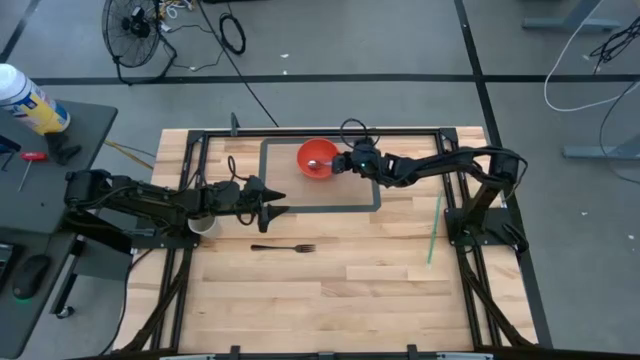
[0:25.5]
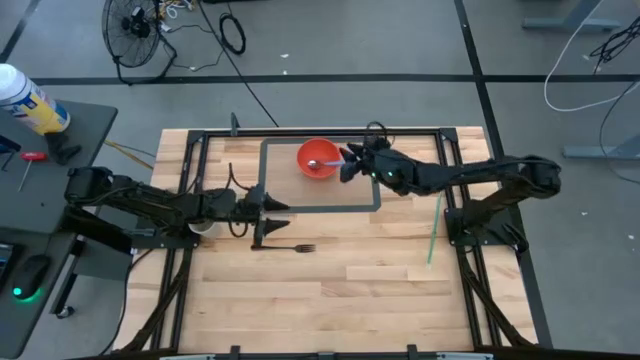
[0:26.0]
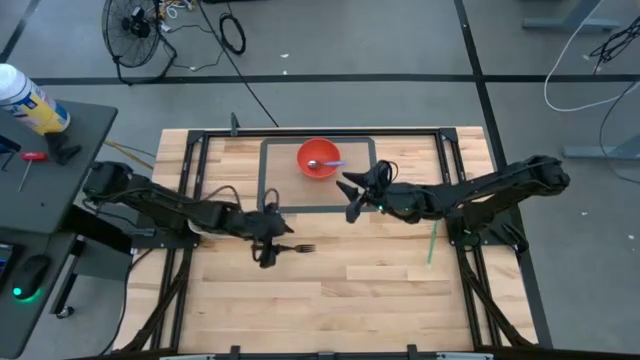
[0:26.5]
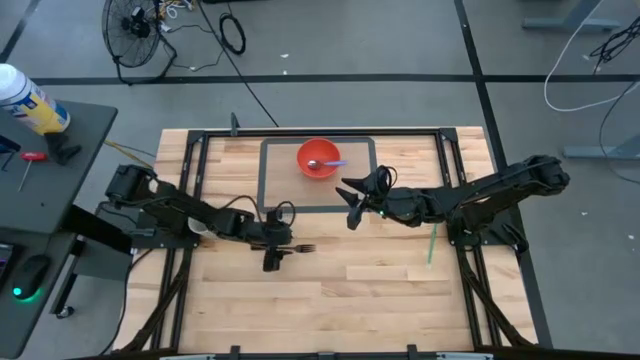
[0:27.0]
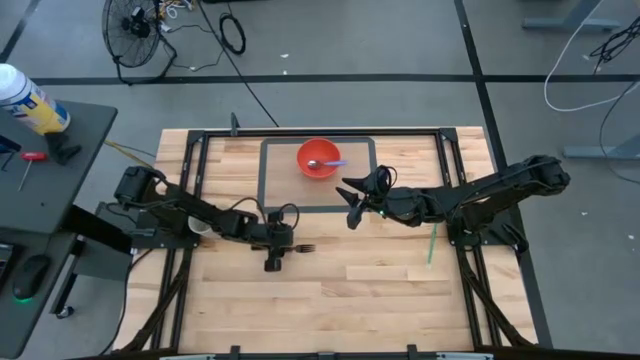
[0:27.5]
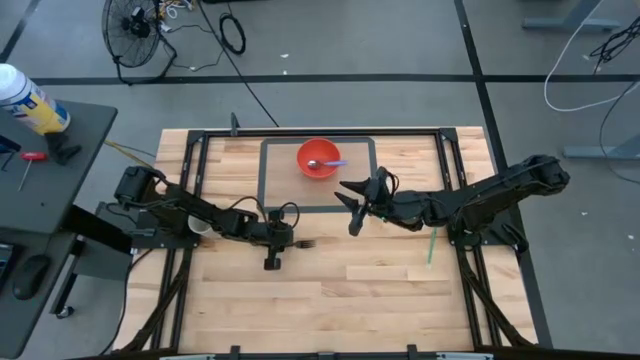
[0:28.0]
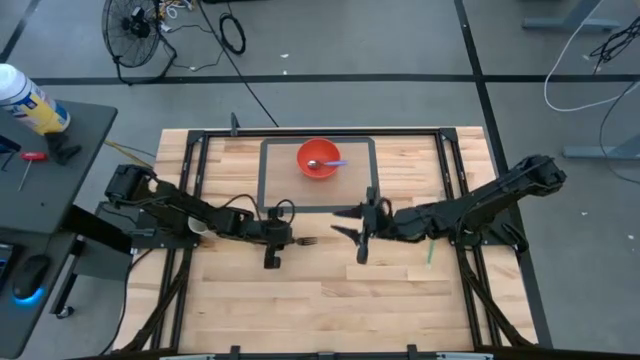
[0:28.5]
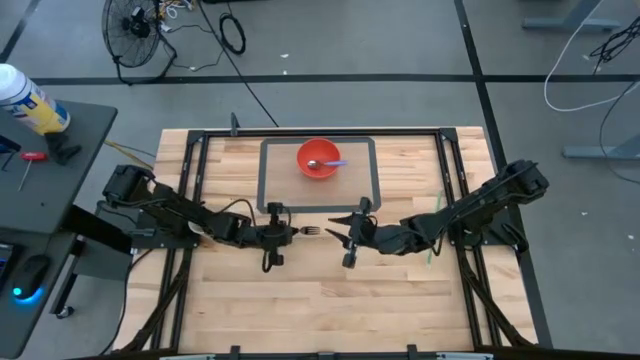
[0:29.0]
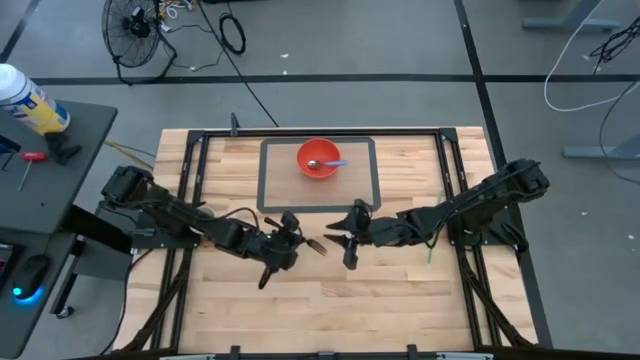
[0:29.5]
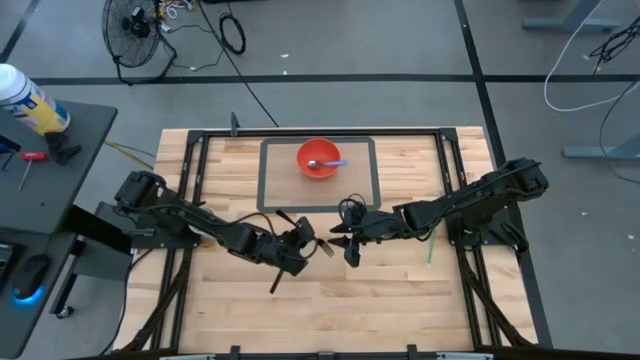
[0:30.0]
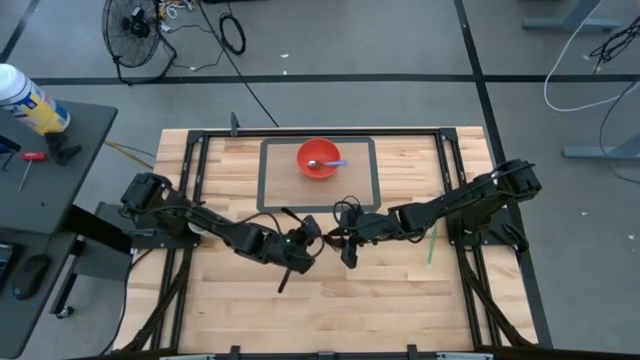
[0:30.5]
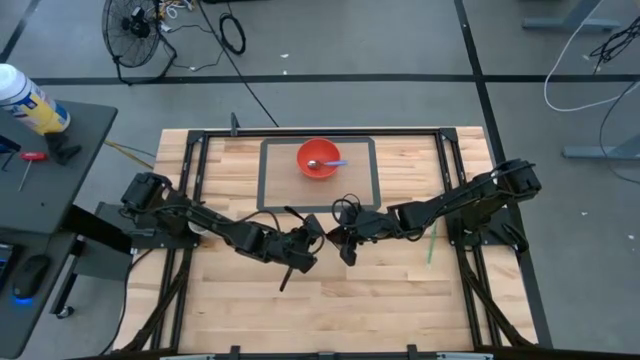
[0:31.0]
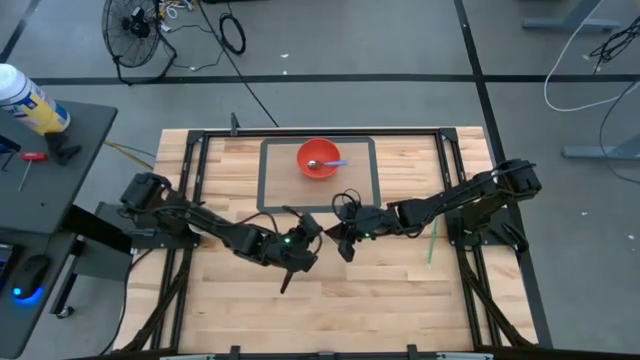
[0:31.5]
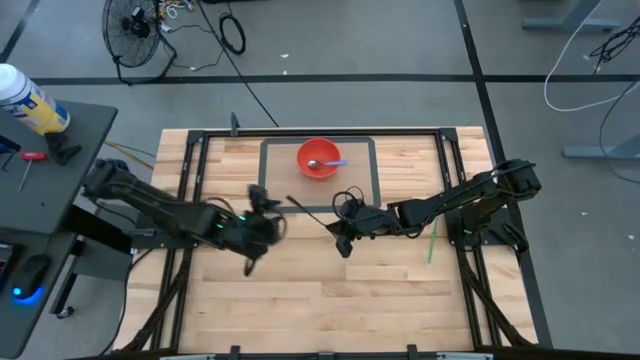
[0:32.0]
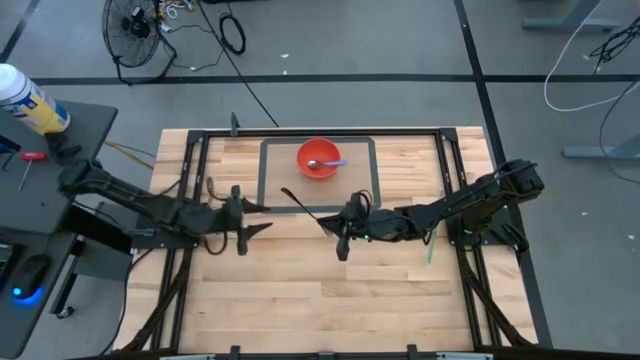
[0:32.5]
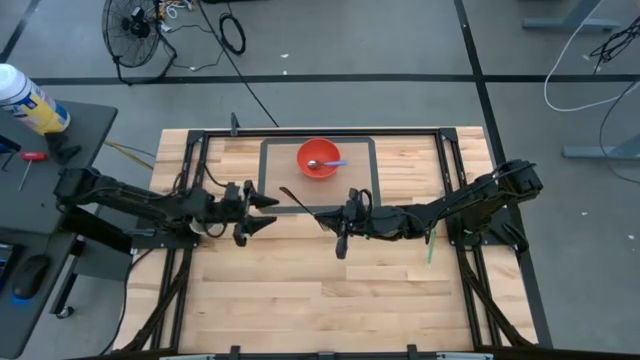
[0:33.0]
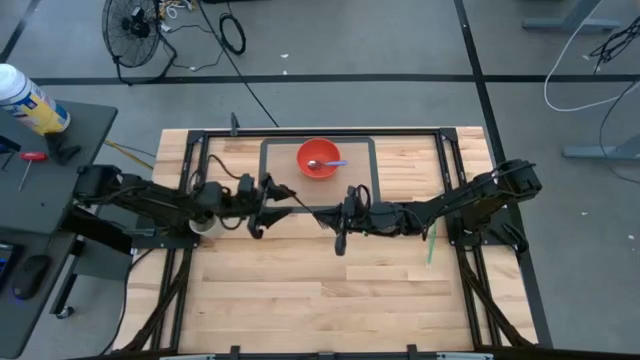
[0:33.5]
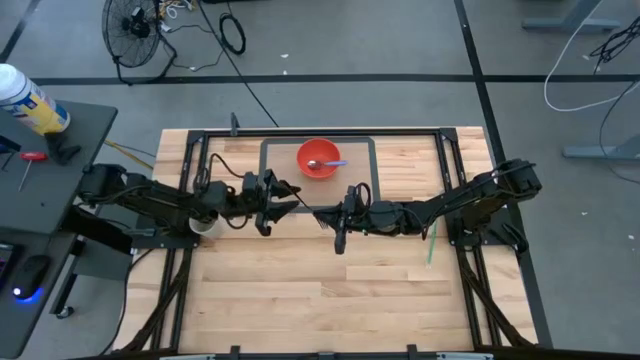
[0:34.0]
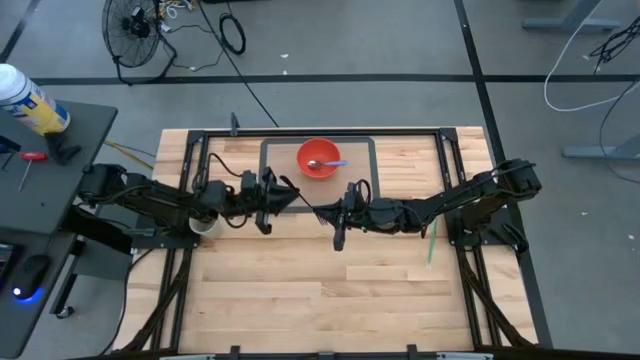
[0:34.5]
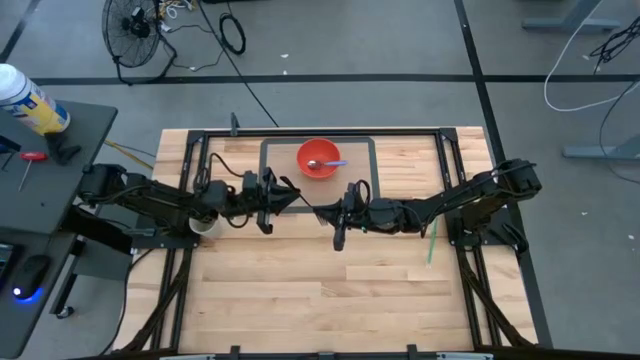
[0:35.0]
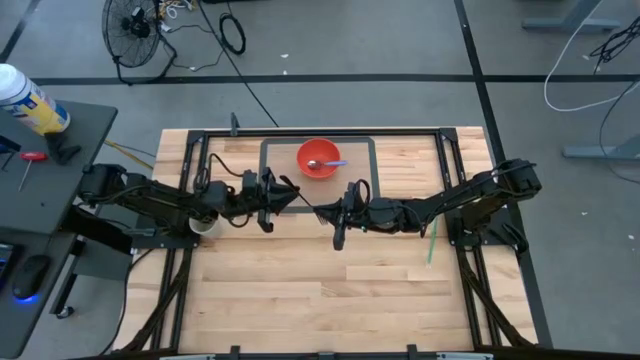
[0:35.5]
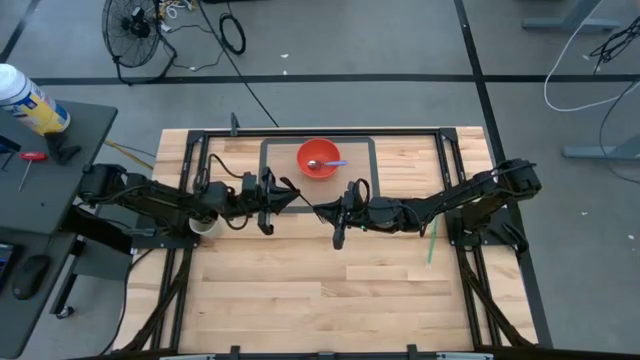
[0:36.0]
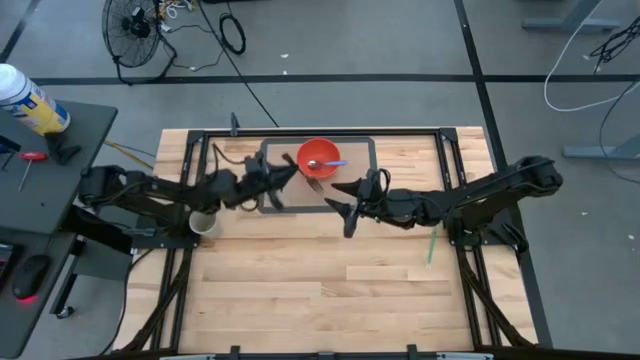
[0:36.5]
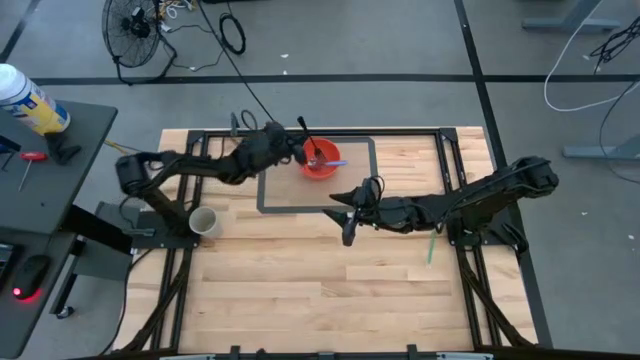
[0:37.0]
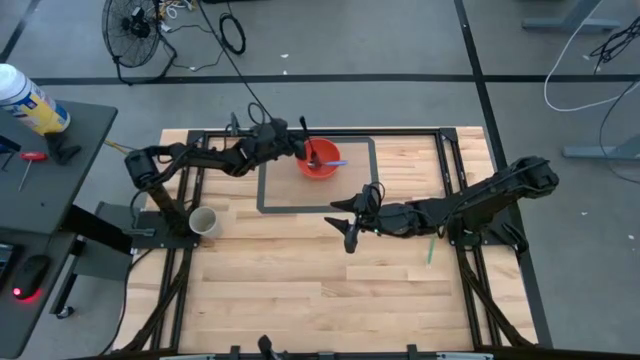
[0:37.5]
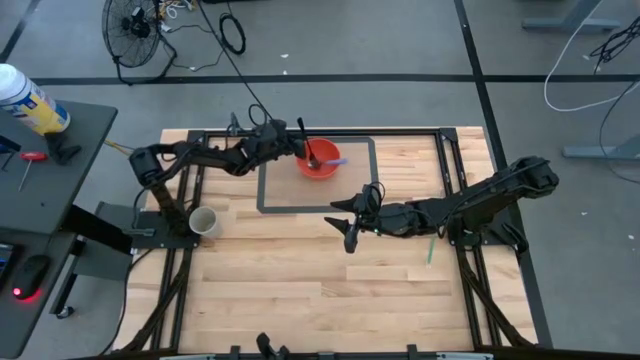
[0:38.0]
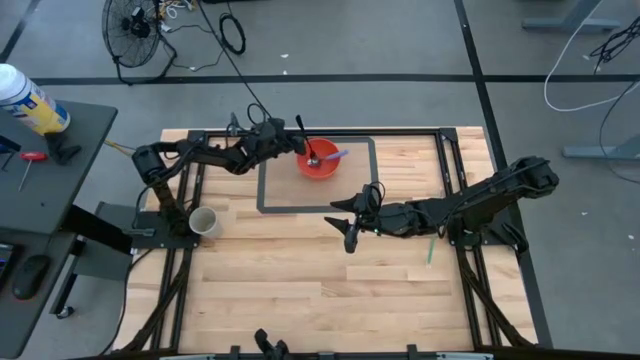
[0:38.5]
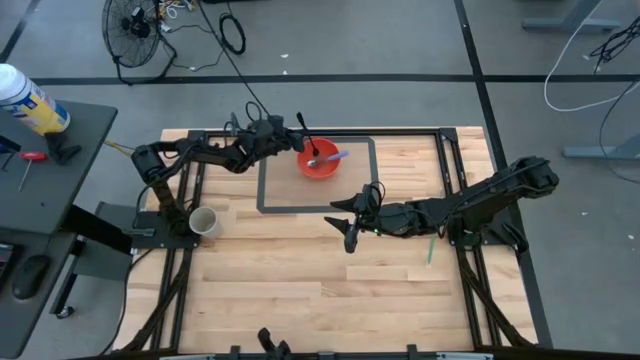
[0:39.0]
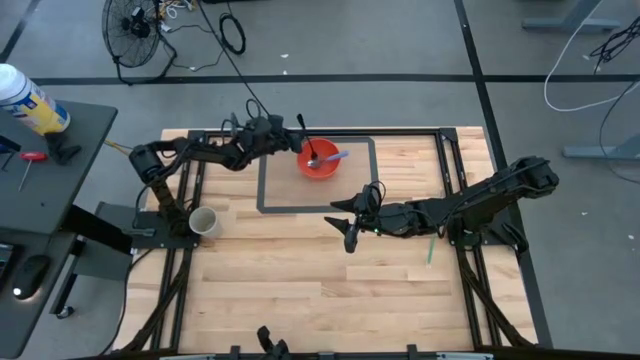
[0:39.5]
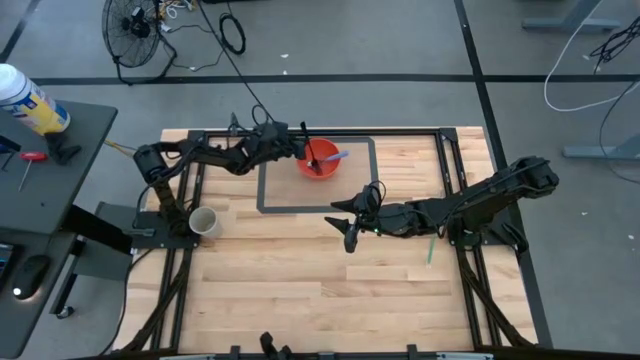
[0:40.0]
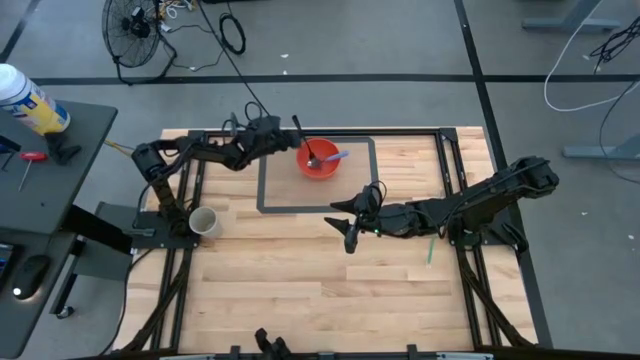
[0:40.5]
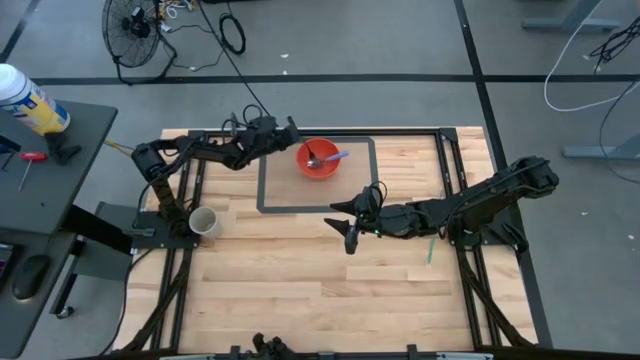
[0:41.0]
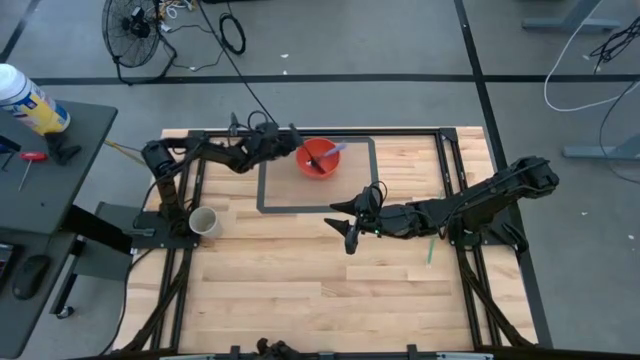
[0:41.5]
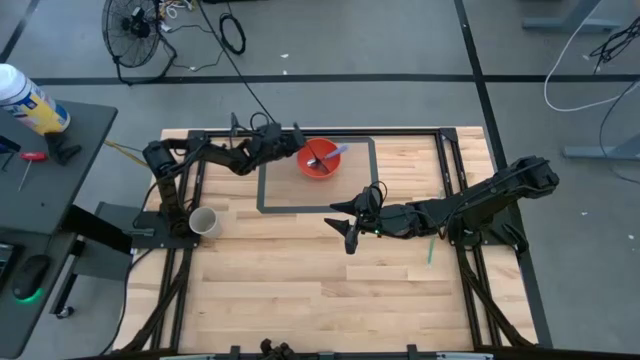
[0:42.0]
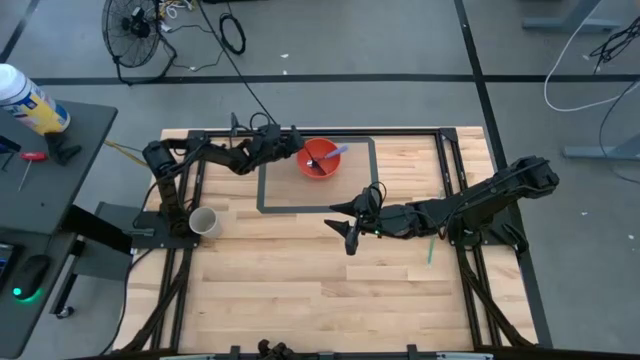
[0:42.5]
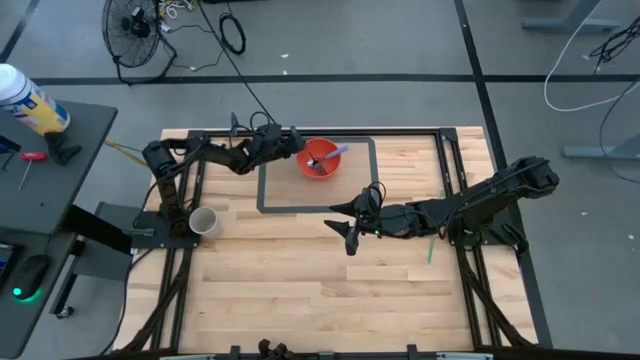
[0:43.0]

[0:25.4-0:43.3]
Task: Pick & Place Utensil
Put the black fork into the orange bowl
